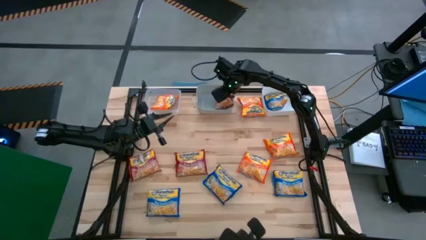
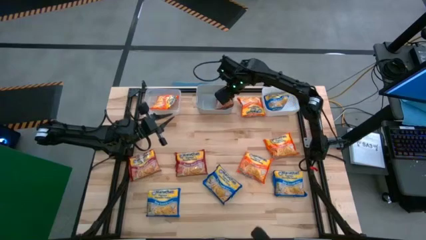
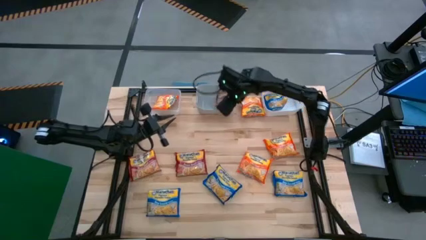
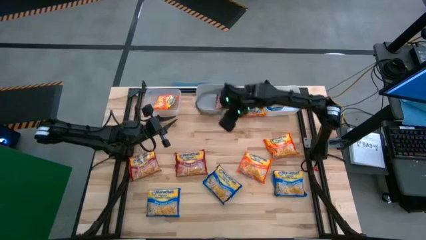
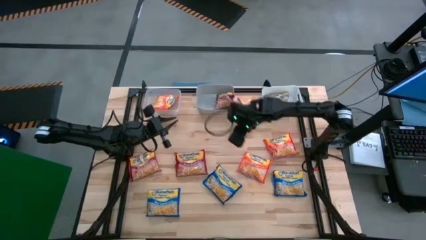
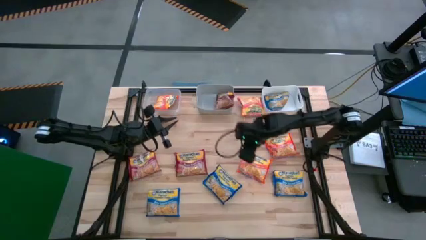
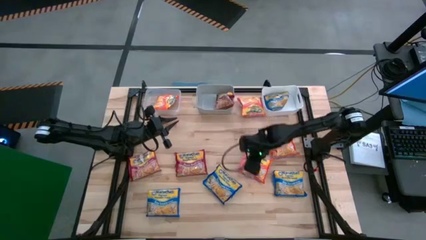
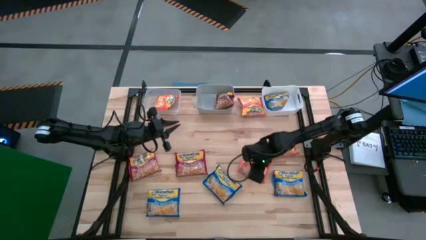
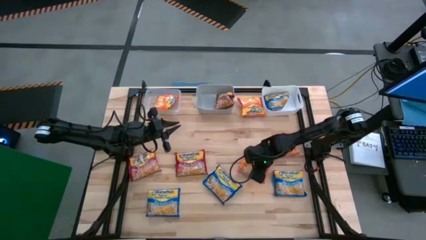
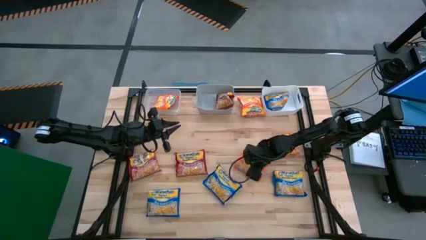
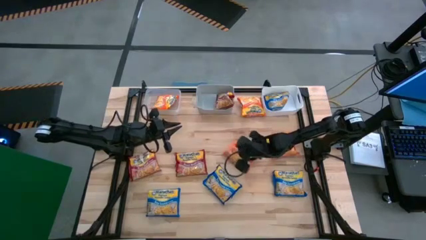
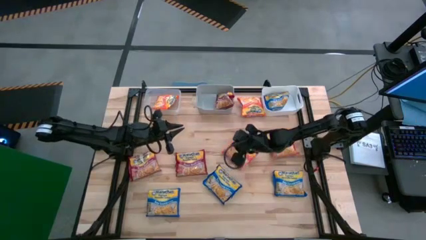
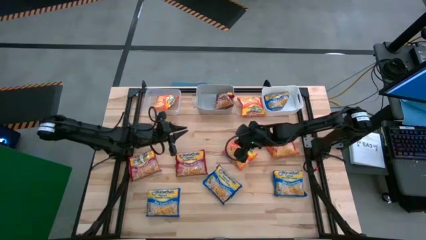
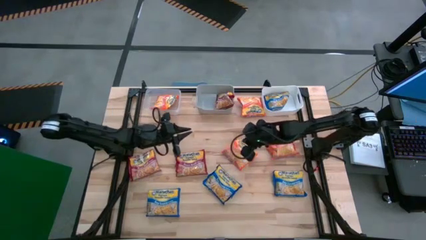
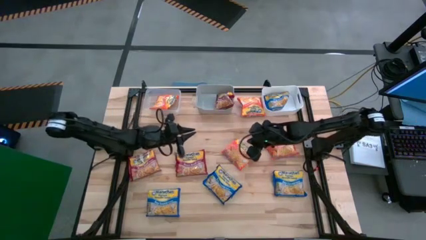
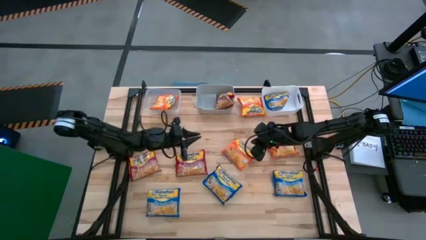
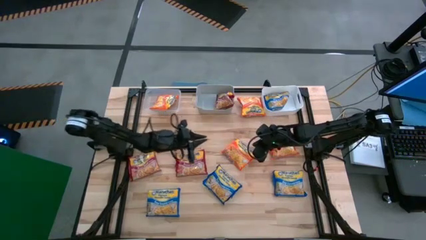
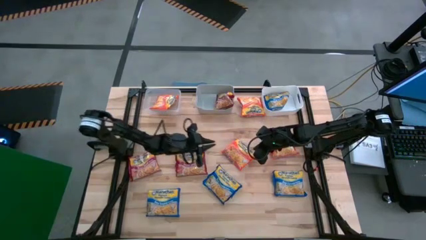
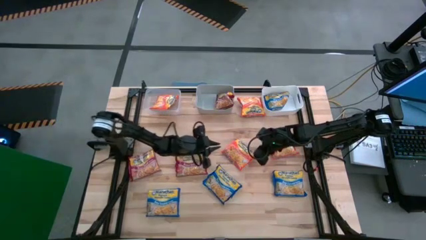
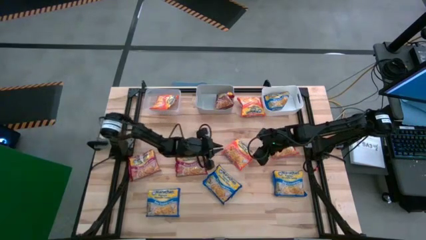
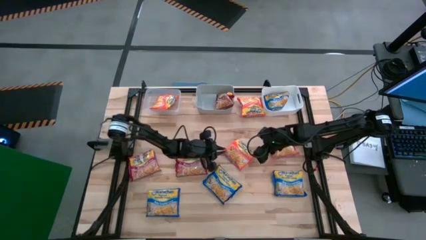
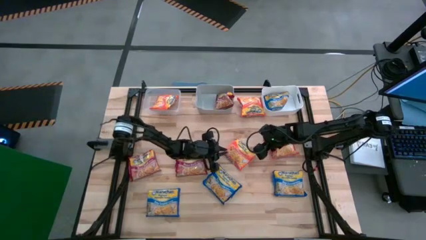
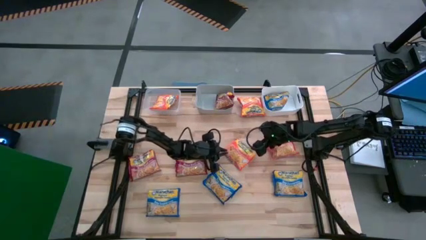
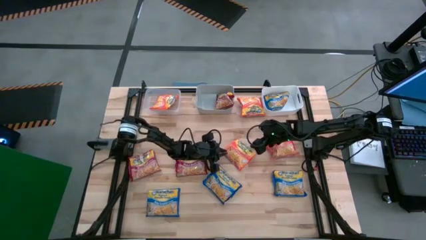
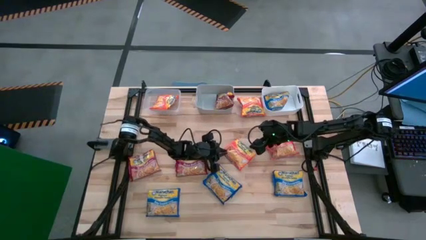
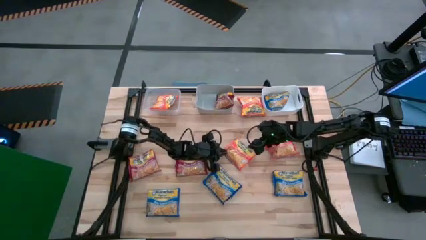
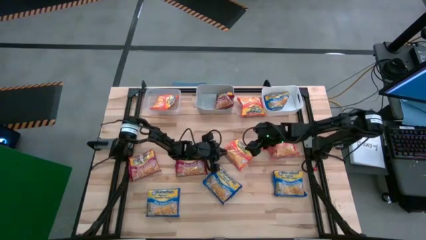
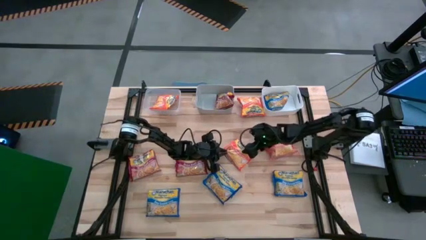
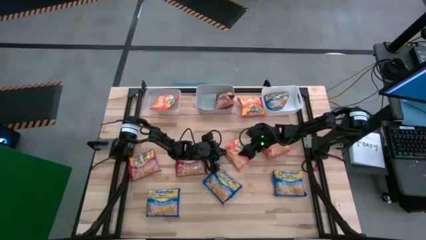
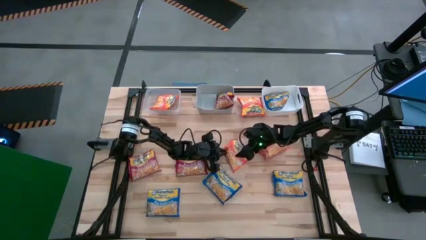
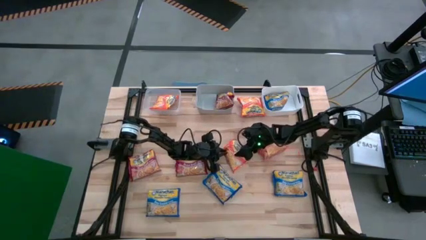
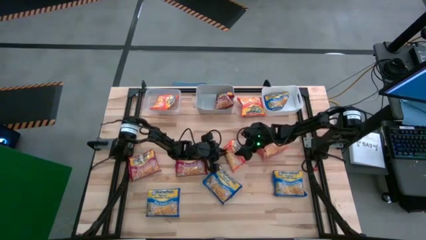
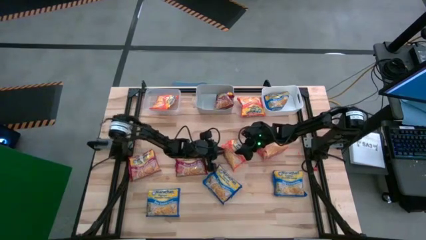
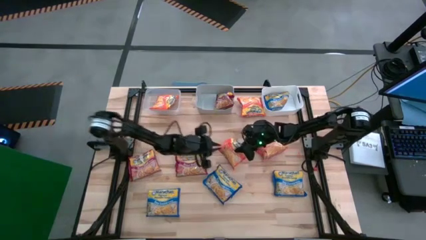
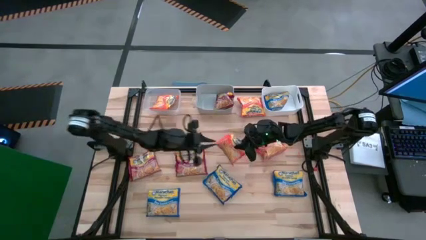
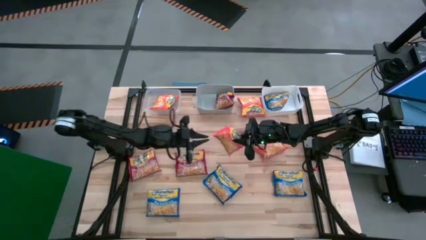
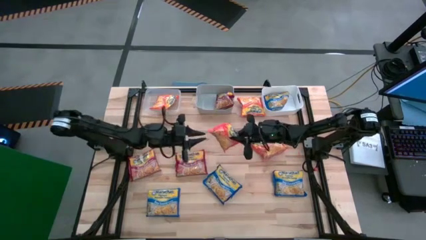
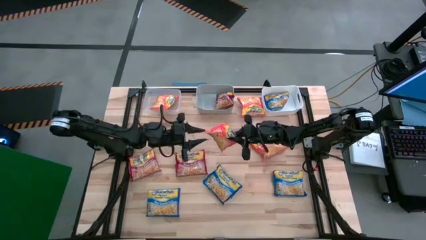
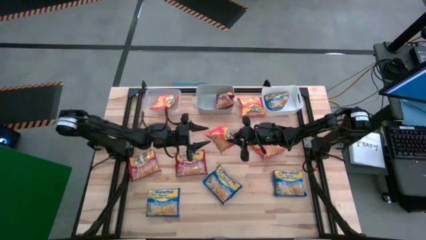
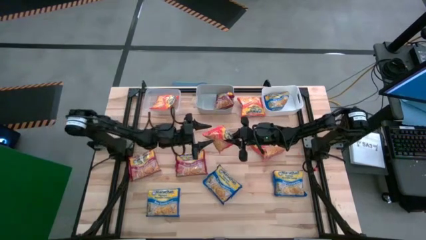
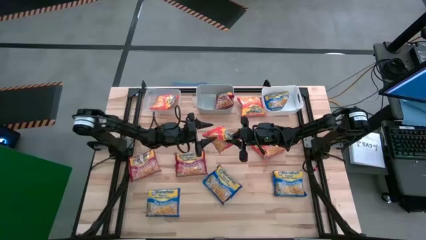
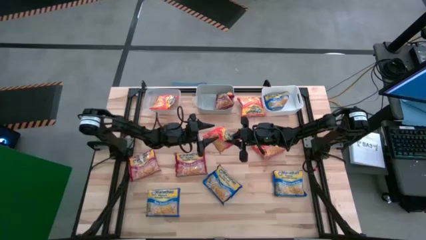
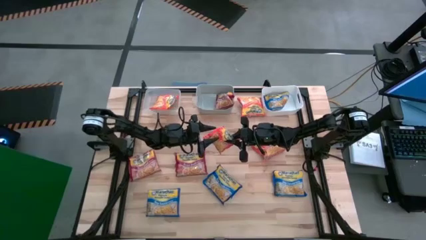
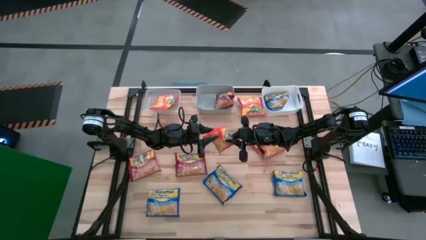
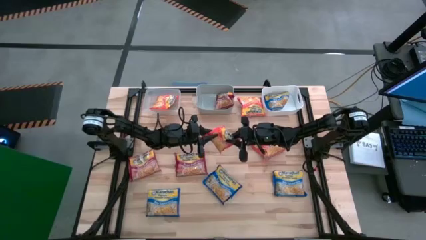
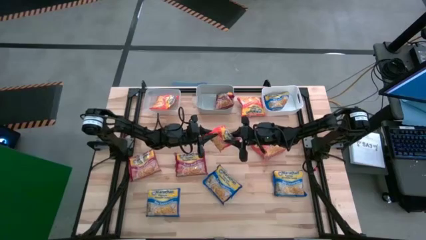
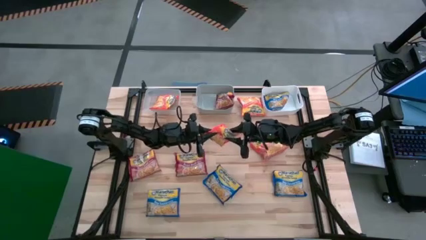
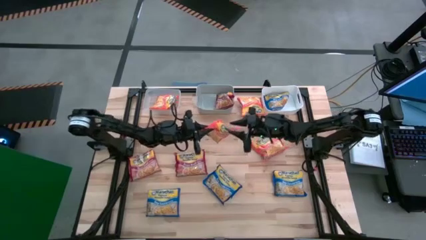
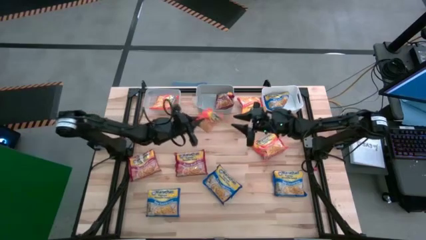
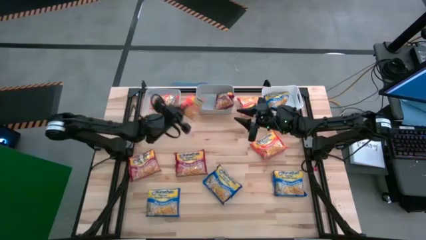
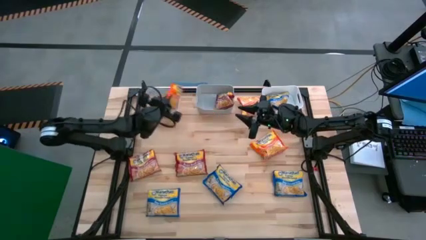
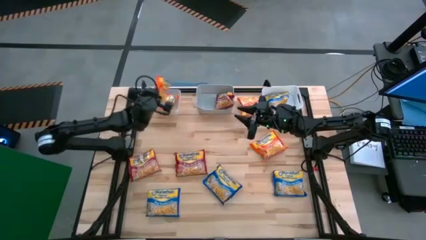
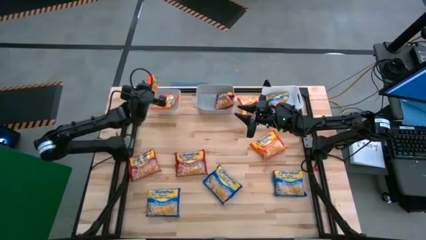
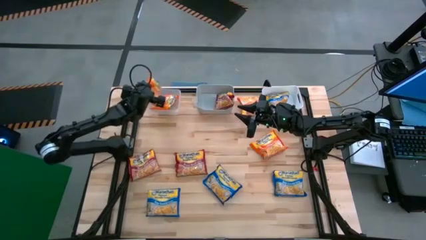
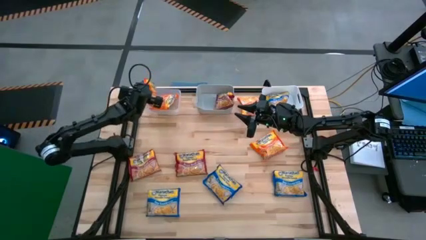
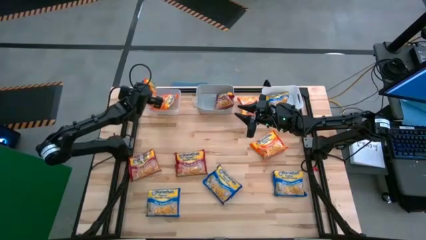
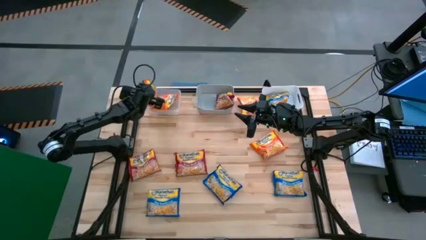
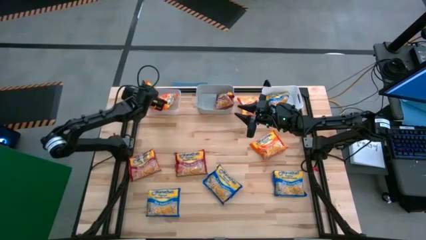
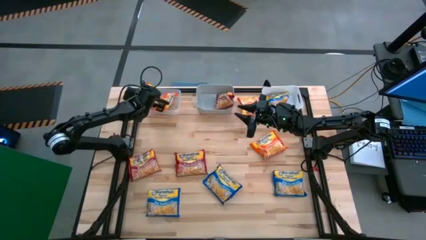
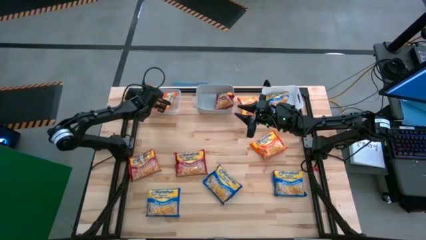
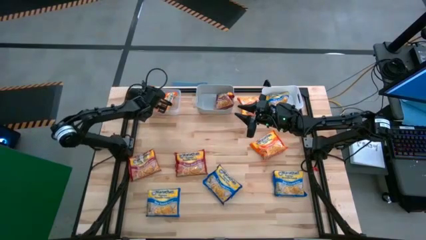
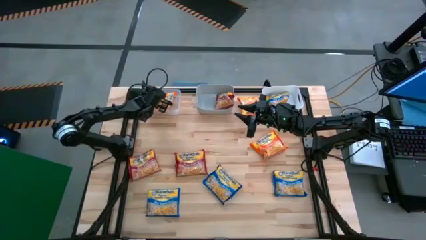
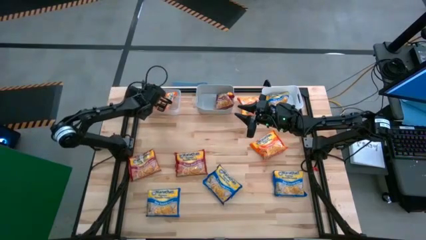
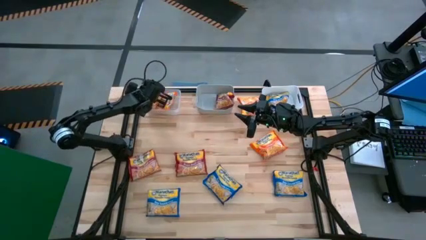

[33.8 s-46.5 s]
Task: Sort Maruchan noodles
Put the orange noodle pack into the transparent bin
